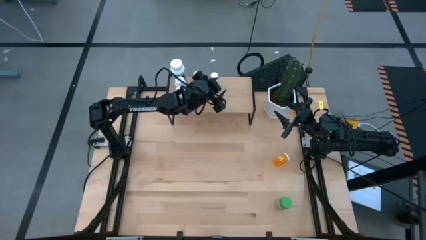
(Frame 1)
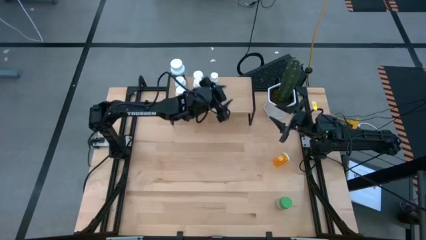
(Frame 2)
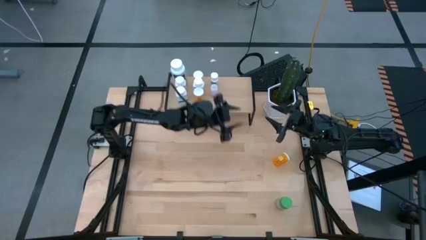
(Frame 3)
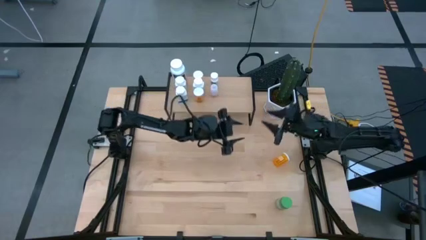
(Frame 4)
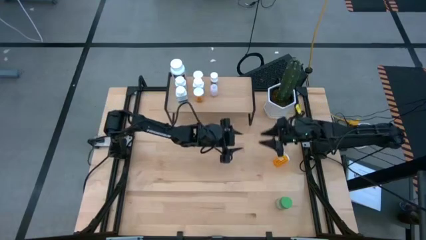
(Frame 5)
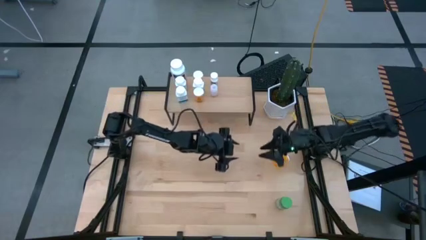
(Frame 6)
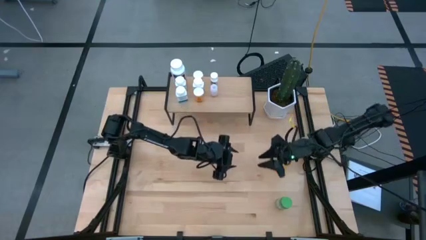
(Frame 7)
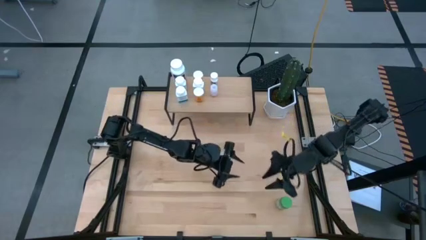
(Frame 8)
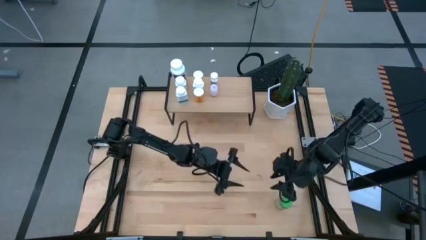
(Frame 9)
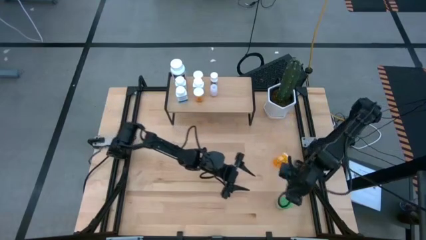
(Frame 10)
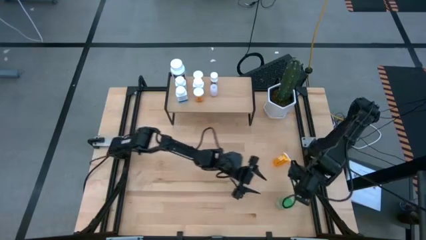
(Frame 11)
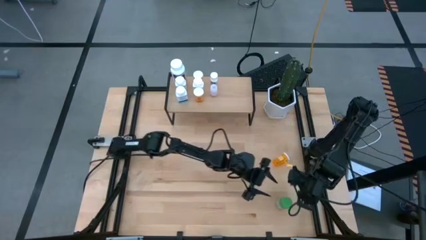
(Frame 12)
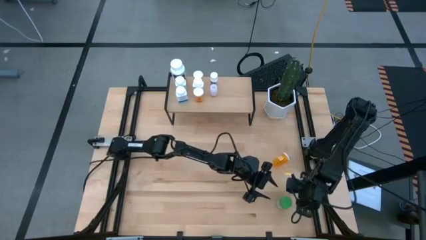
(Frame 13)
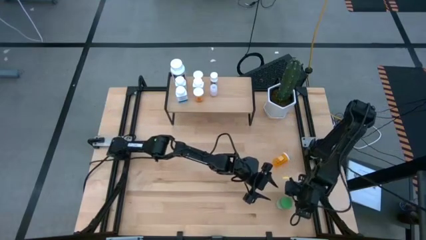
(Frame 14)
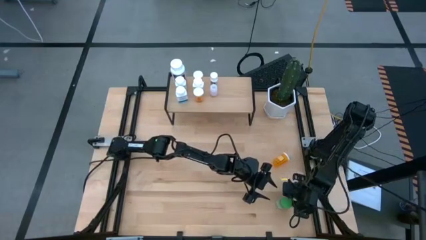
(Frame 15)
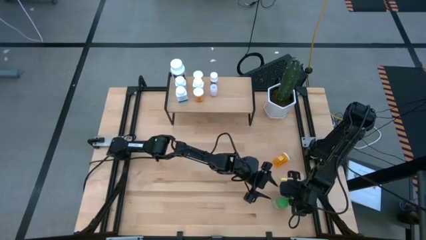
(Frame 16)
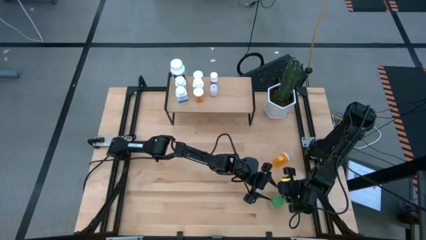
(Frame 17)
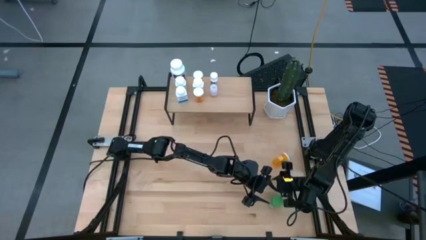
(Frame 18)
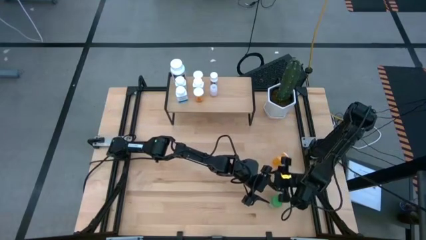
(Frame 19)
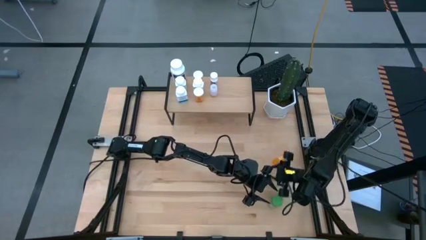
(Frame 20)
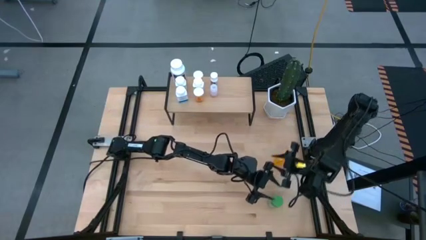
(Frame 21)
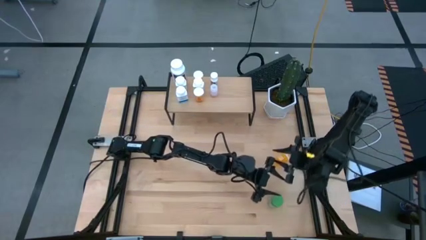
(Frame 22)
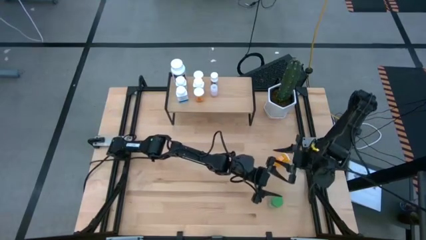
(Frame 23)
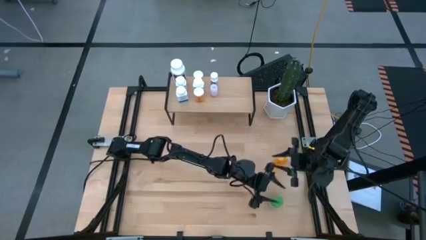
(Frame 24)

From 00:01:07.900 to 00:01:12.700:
Task: Pick and place medicine bottles onto shelf by color
Put the green pill bottle on the shelf

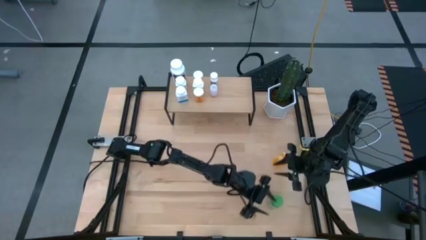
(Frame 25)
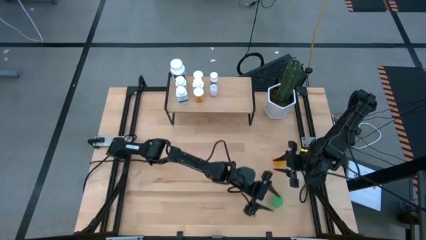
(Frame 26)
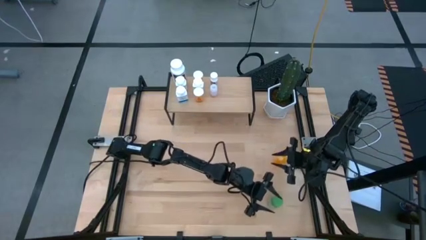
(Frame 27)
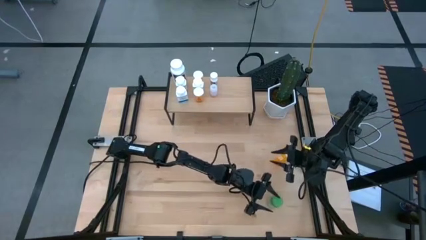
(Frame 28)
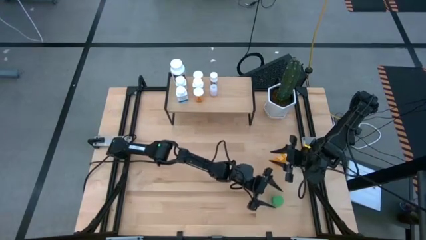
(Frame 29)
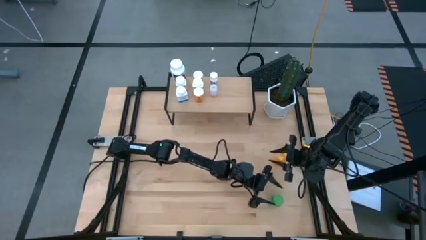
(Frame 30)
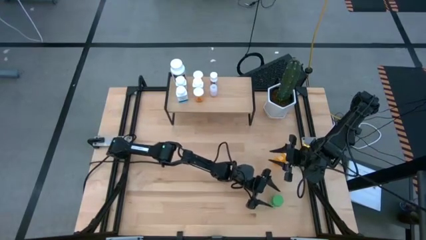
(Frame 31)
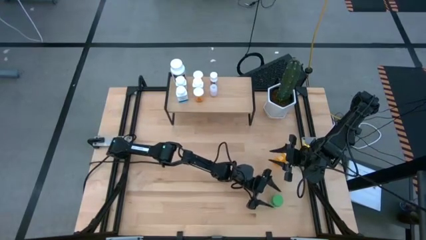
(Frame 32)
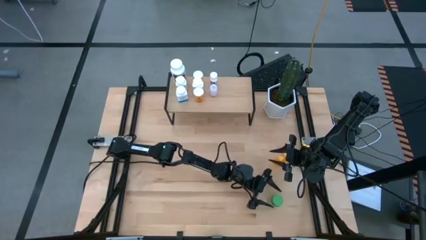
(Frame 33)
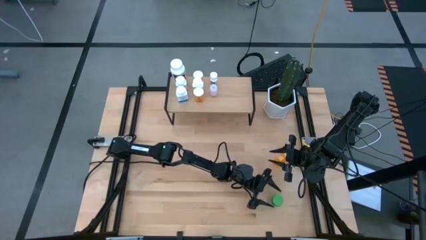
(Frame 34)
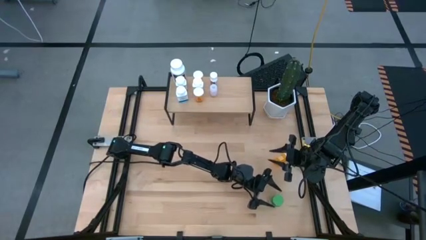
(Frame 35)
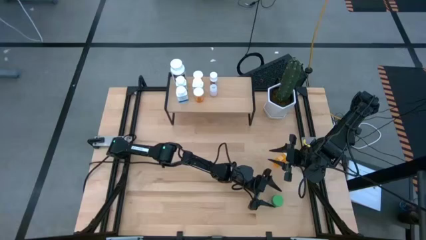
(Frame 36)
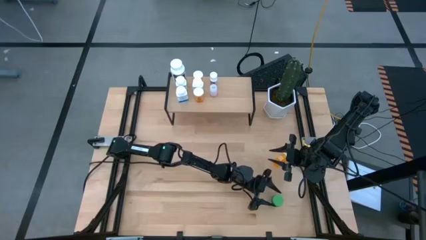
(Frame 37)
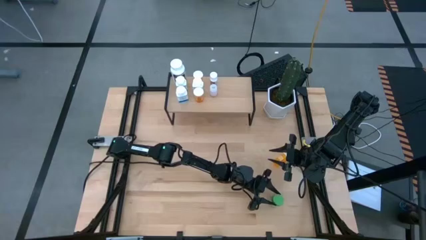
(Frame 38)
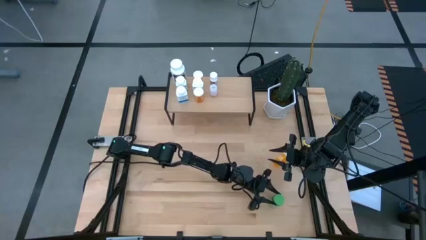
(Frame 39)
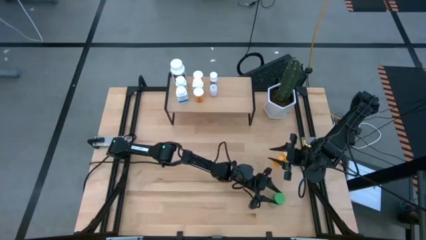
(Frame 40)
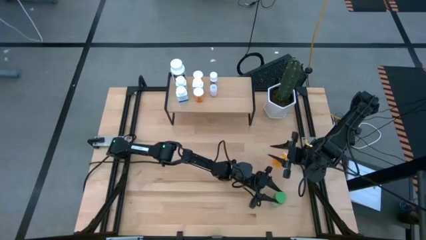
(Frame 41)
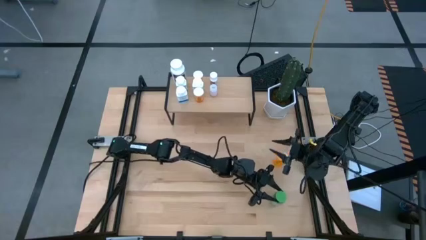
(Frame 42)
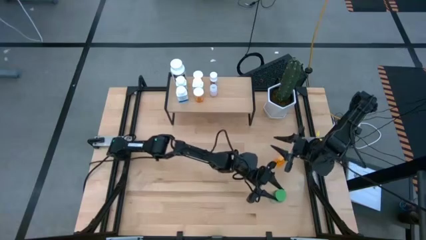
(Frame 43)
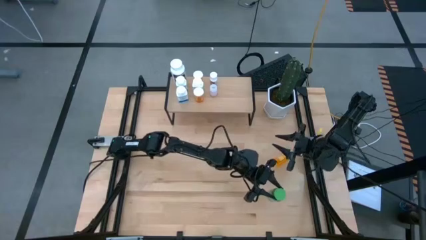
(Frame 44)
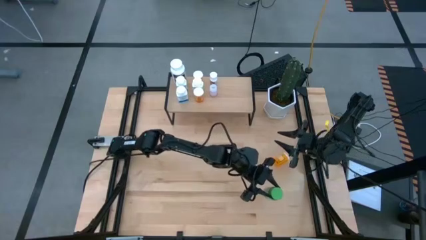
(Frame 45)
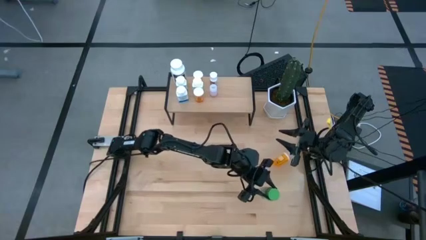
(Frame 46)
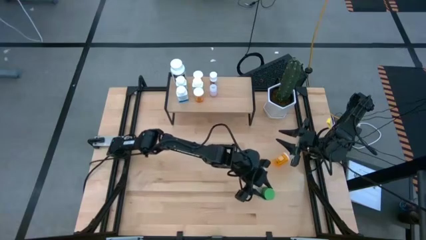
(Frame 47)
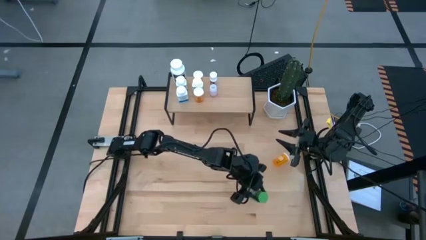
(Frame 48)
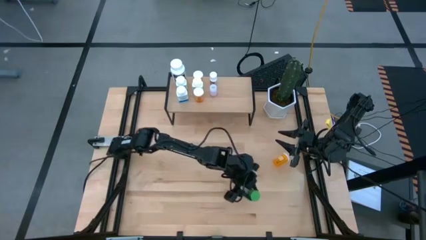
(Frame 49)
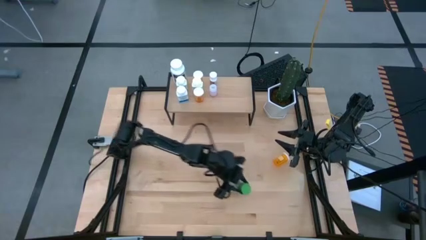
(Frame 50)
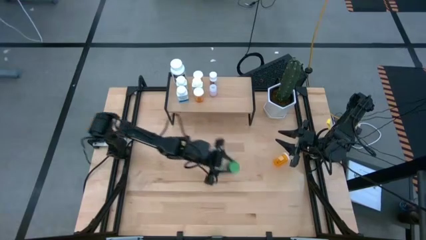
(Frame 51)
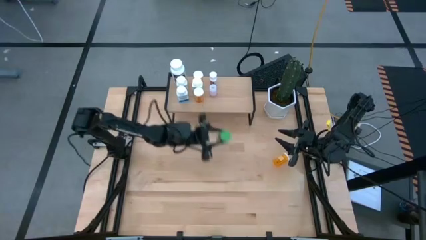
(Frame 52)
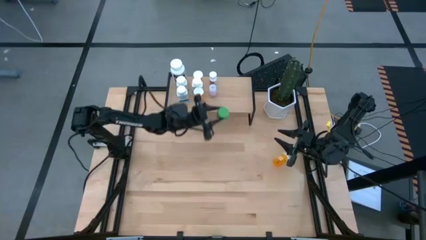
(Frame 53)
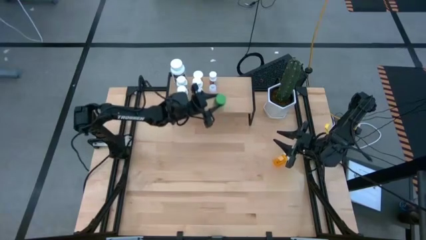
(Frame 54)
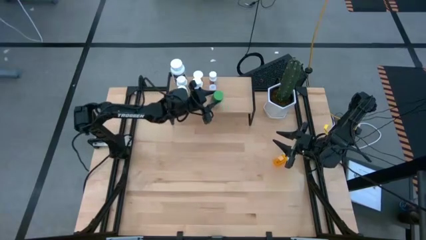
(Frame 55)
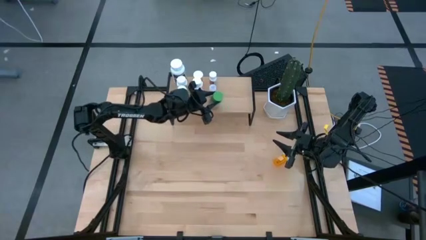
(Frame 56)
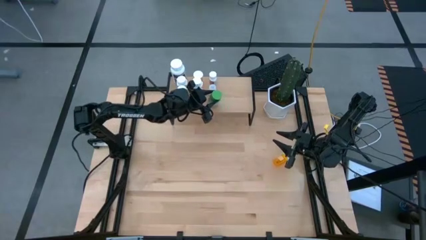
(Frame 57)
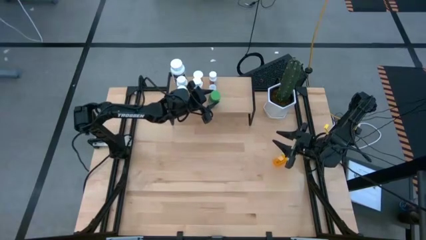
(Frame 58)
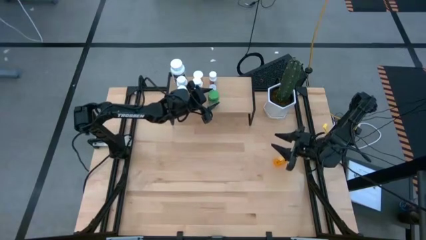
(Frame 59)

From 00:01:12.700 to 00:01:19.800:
Put the green pill bottle on the shelf

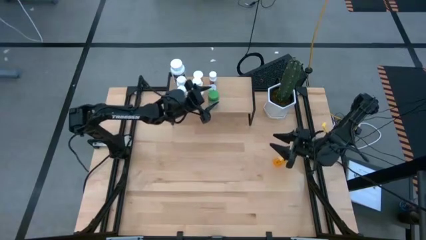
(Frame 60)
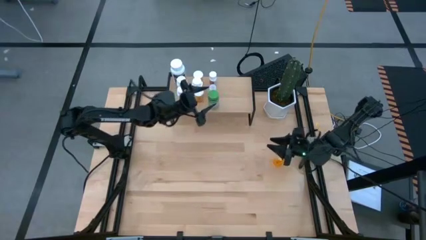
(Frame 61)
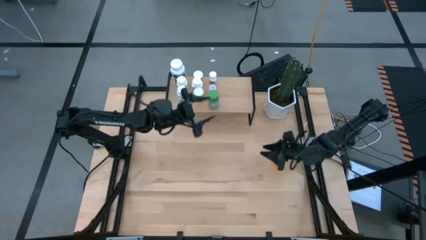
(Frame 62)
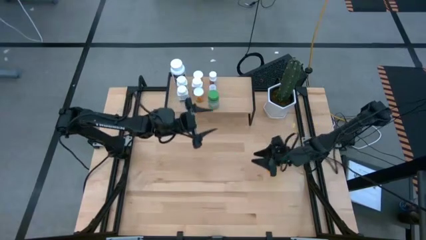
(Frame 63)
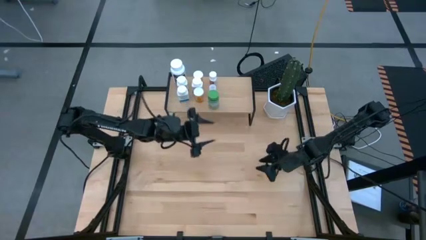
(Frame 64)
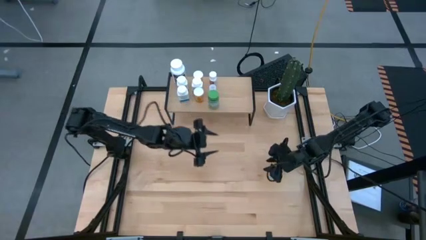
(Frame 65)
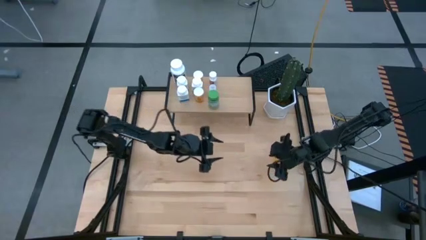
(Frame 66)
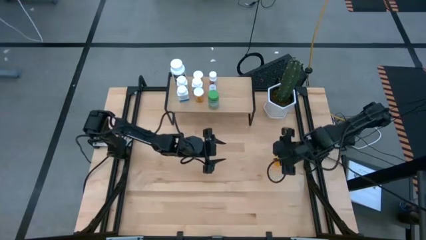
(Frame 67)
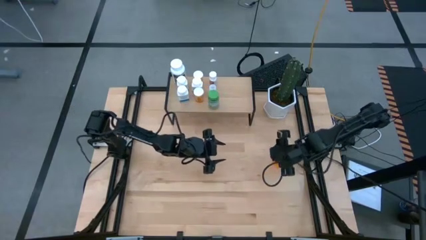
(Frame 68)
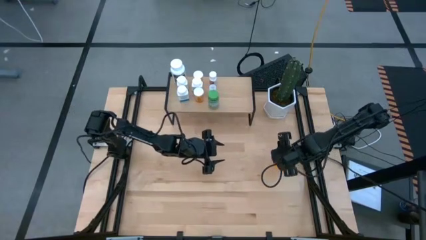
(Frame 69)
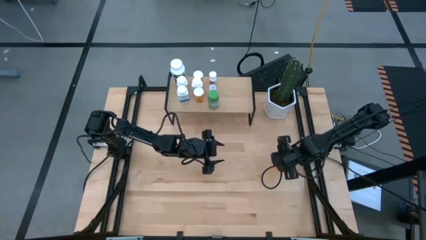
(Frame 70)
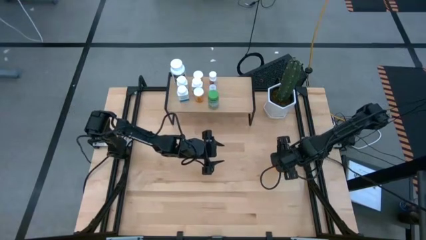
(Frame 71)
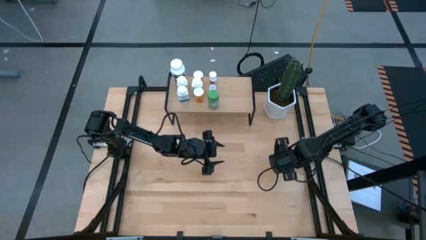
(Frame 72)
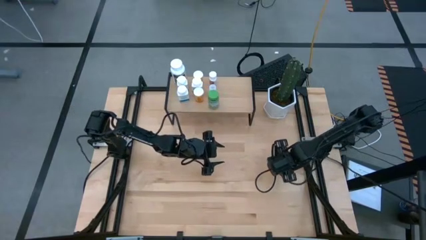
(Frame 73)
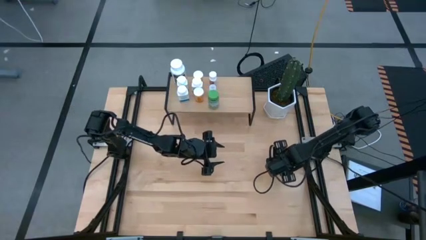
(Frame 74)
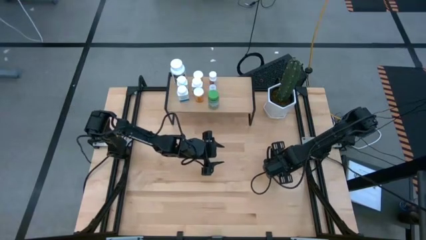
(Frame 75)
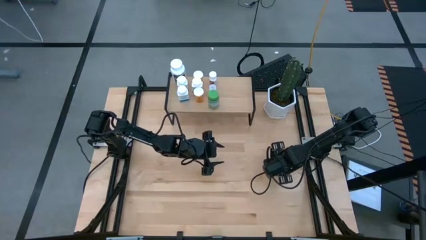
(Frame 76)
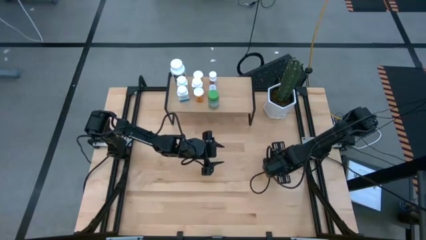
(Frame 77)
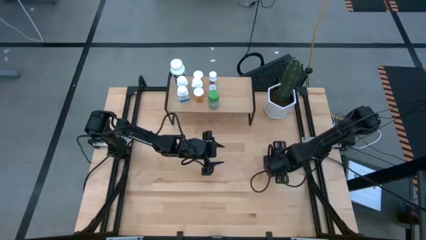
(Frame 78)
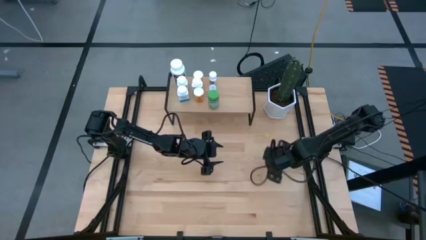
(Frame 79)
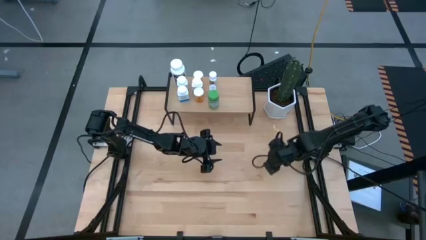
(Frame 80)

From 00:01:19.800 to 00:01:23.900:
Put the orange pill bottle on the shelf
